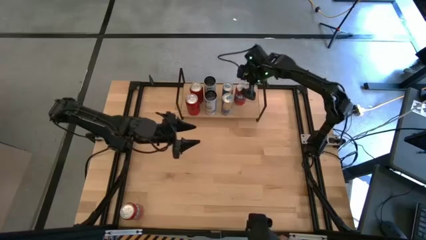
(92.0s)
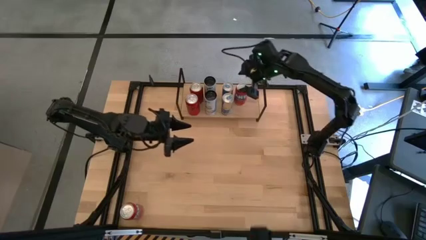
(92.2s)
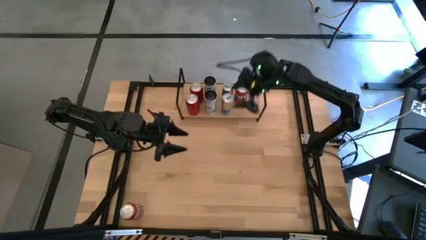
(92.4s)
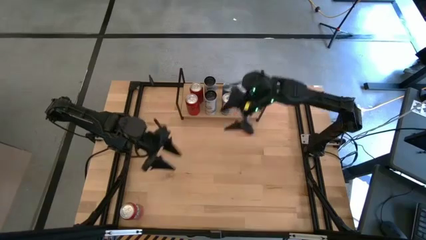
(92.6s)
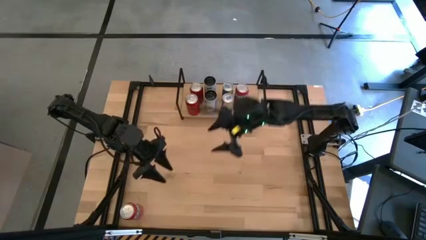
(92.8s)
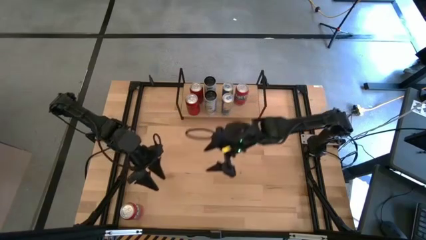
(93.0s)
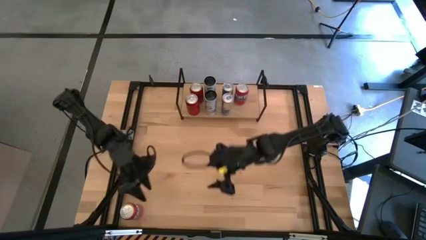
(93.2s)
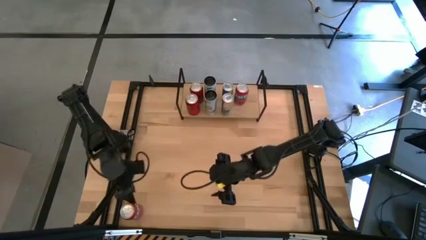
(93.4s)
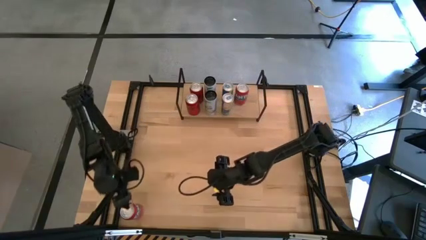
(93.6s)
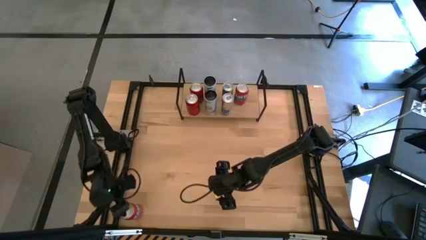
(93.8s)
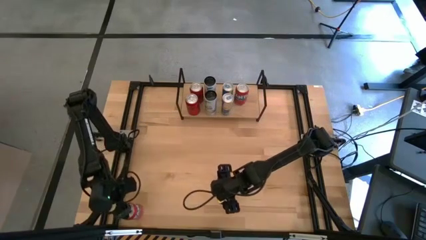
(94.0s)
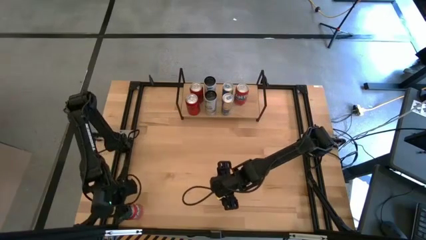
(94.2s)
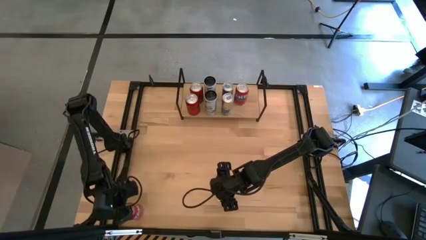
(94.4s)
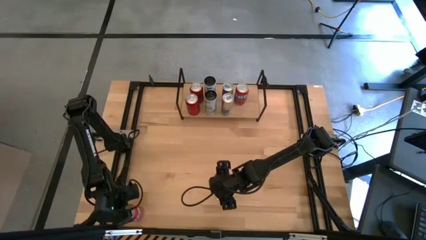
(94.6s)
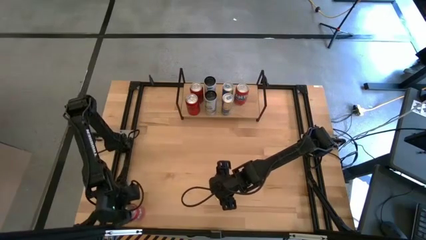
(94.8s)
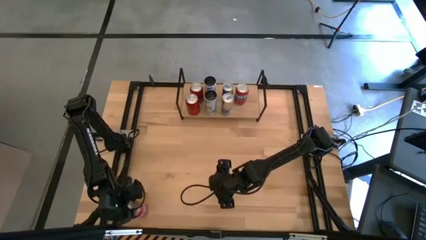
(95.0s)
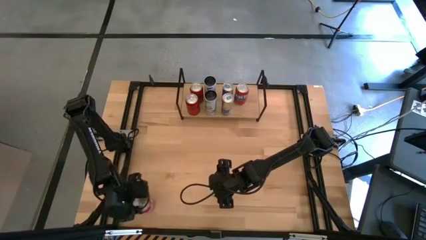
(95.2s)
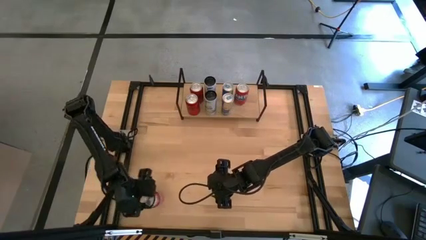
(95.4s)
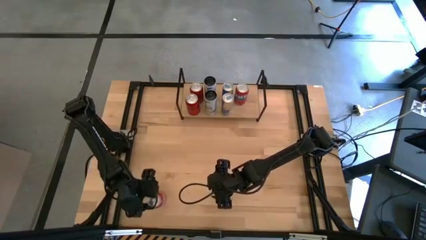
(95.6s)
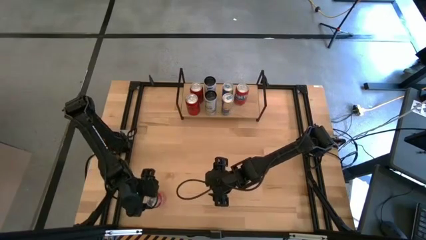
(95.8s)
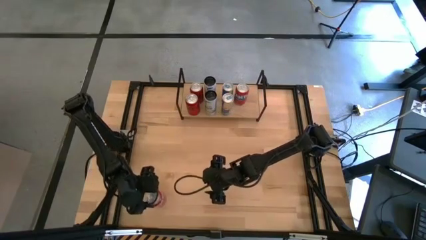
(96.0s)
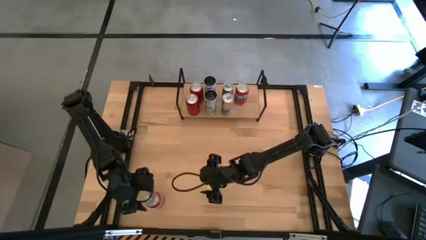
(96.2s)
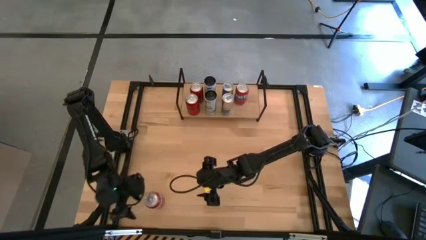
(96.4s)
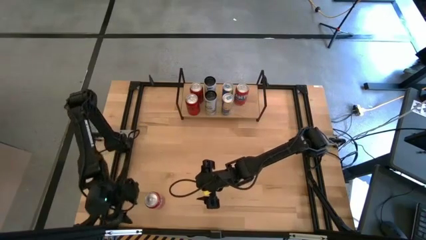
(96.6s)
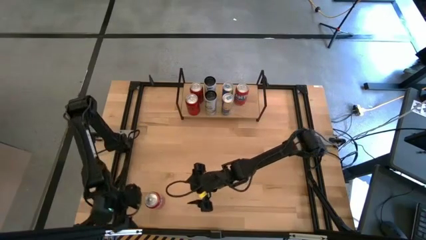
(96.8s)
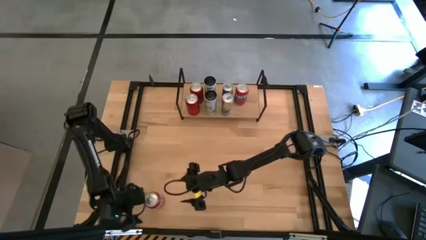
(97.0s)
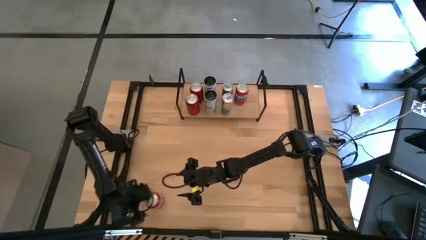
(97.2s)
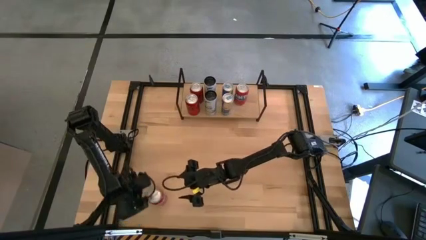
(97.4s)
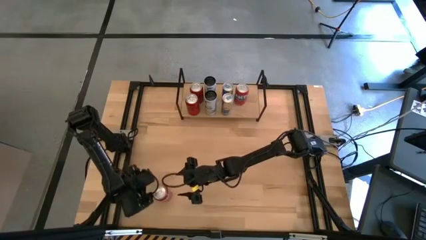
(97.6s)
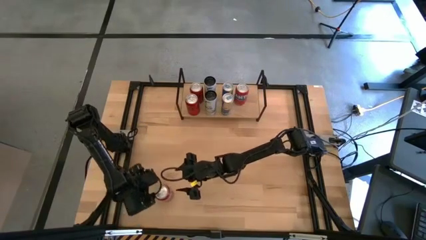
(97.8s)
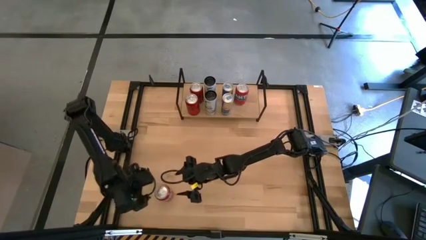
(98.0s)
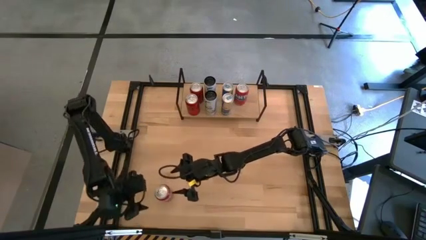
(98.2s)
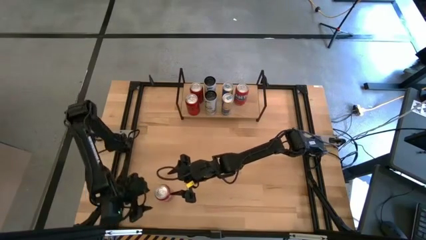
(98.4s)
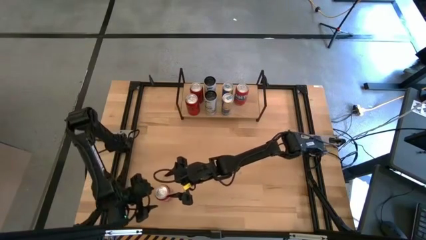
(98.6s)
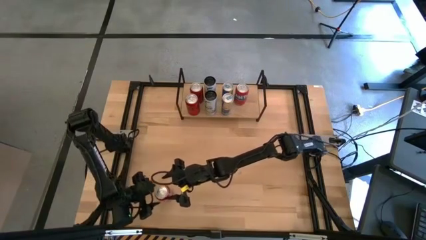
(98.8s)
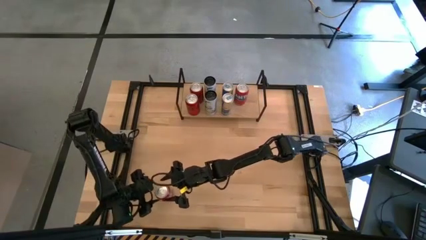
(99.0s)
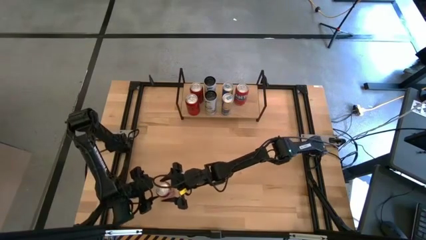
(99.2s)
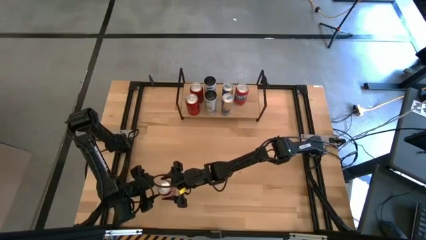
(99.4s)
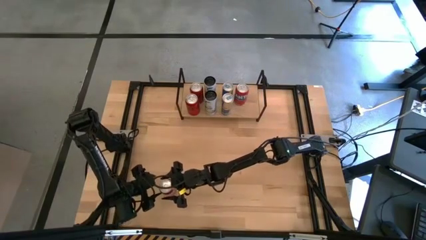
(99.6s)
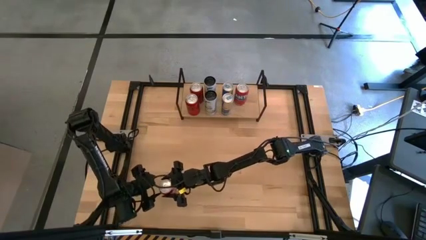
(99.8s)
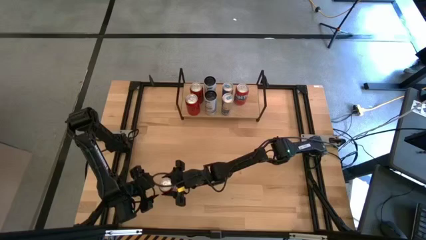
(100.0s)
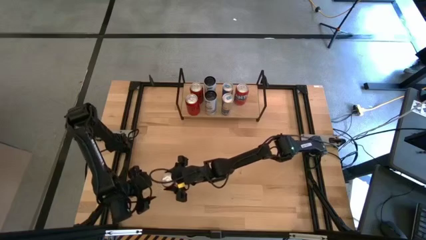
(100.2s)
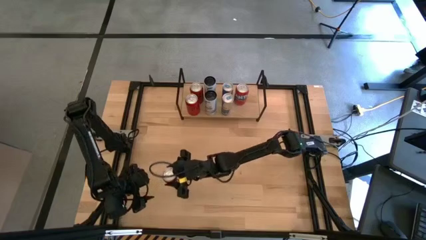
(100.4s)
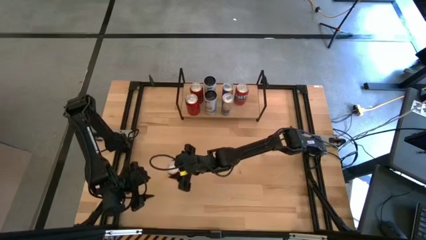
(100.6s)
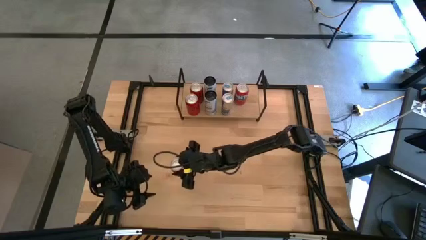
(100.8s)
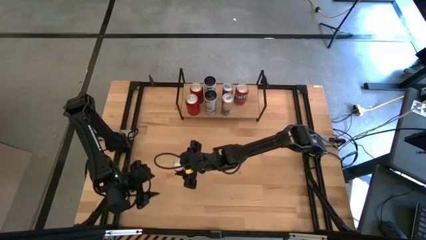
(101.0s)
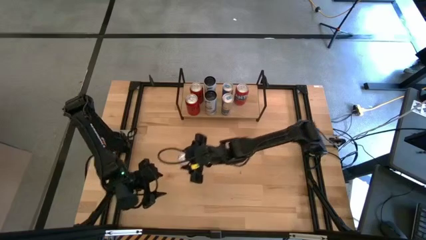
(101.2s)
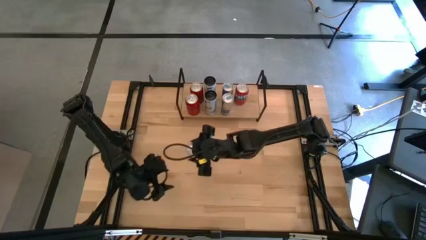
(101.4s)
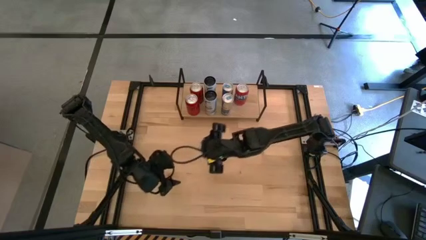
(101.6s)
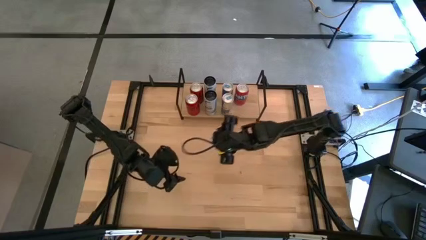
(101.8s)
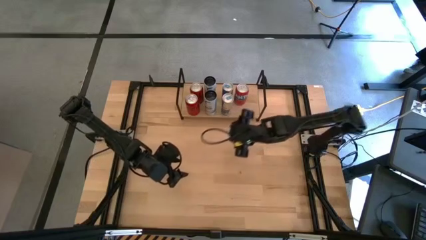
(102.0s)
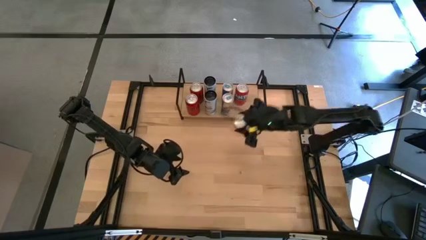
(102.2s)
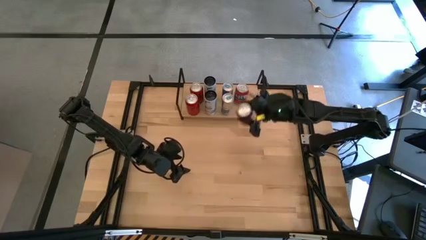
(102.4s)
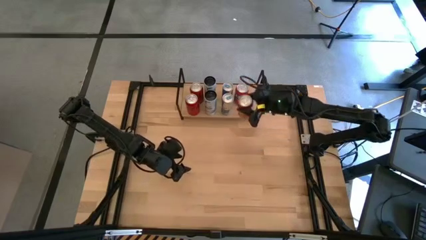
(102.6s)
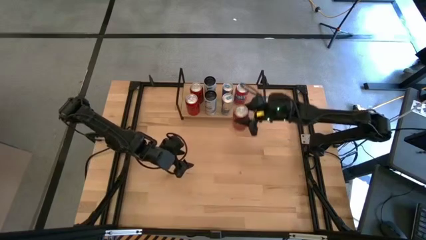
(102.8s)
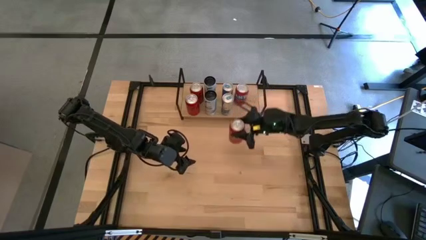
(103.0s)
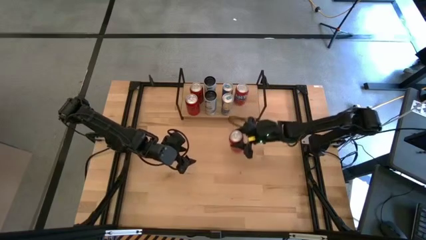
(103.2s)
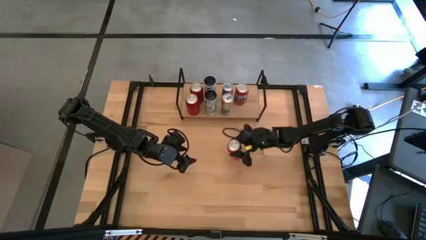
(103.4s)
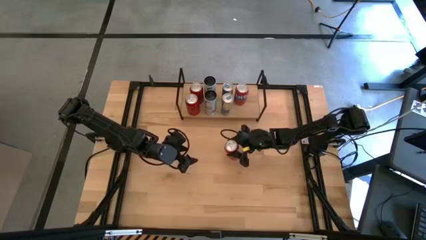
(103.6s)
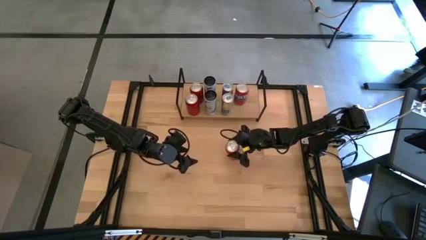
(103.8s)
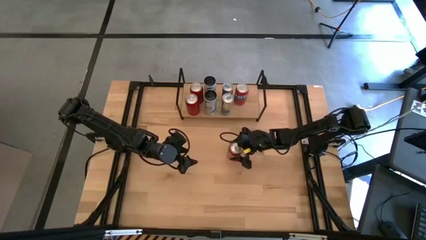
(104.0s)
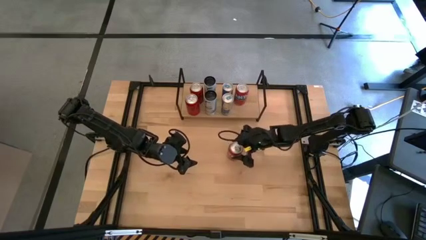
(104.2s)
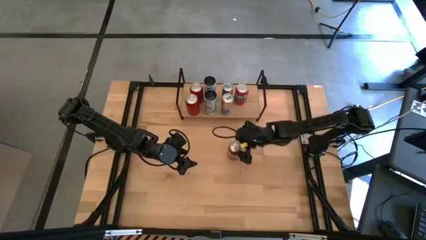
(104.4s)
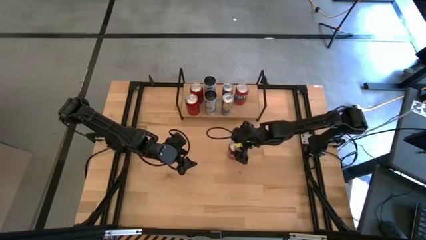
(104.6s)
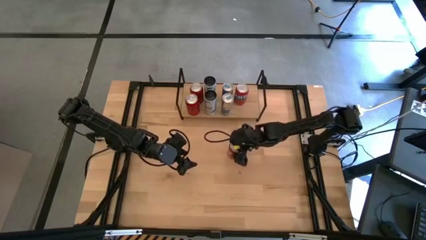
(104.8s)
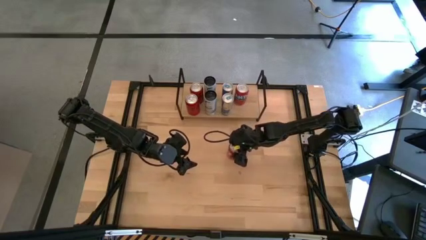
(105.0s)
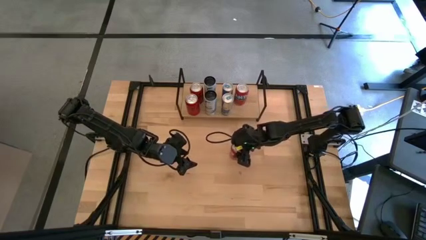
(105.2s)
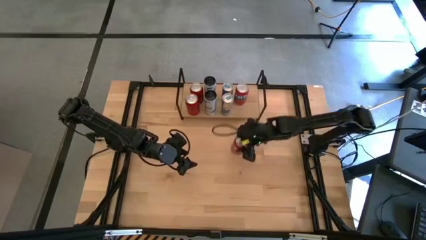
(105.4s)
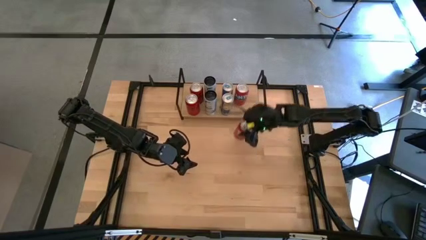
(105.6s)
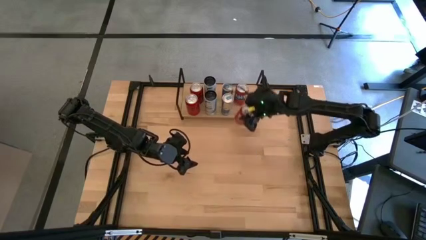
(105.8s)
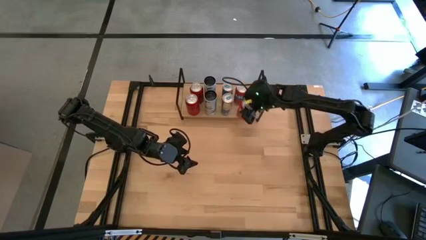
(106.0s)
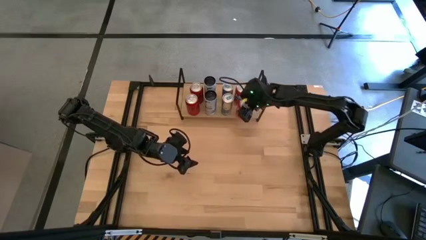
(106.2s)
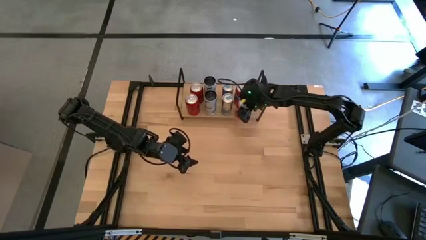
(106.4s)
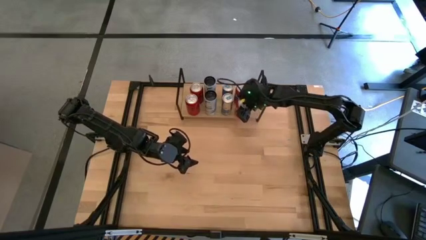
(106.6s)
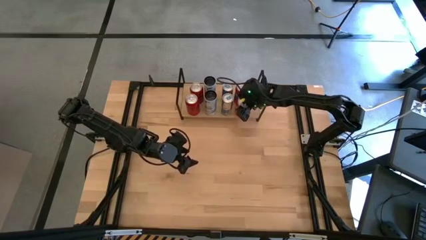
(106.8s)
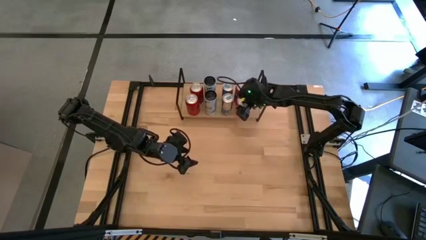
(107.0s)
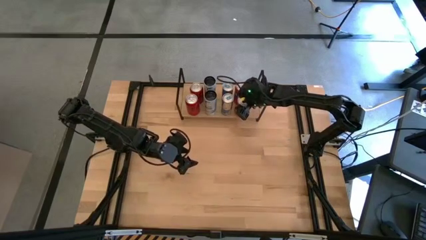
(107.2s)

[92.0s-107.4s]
Task: Place canned beverage on shelf
Put the orange soda can on the shelf and align it with the other orange soda can

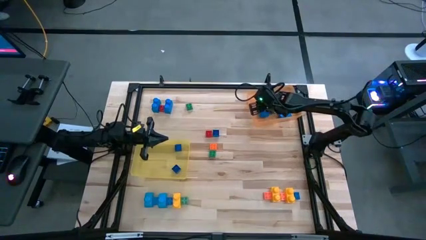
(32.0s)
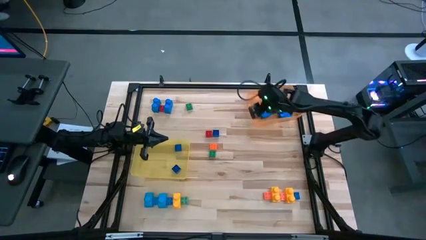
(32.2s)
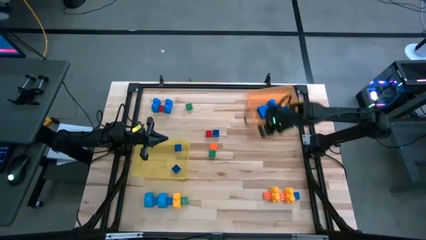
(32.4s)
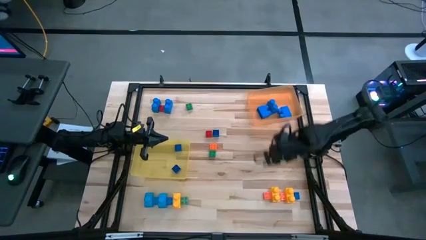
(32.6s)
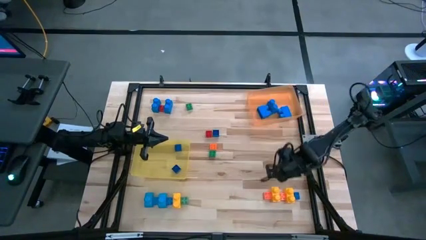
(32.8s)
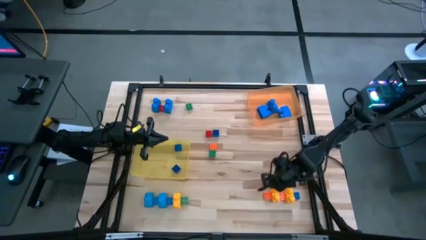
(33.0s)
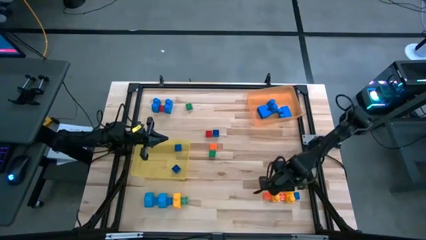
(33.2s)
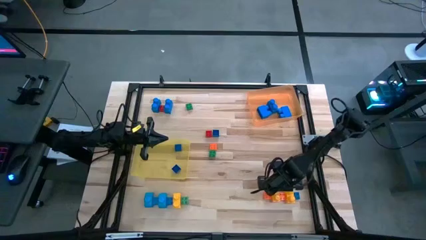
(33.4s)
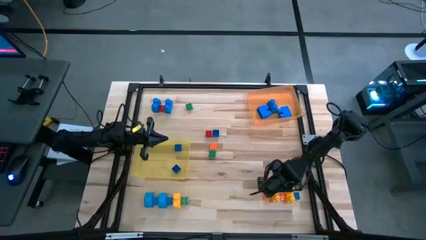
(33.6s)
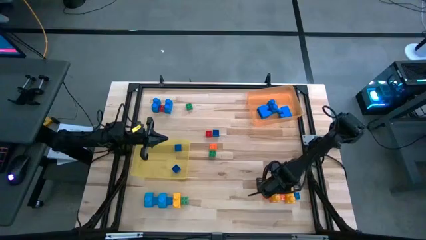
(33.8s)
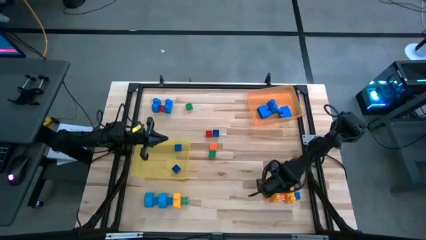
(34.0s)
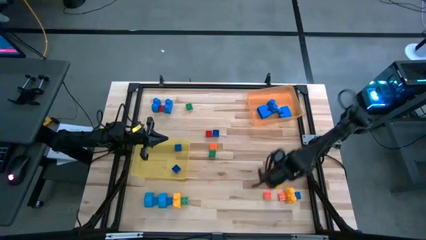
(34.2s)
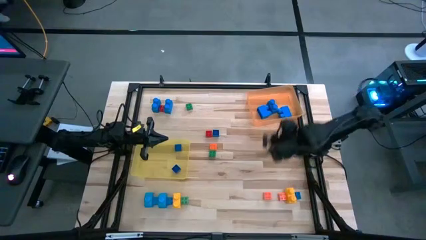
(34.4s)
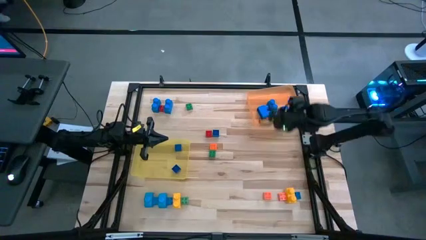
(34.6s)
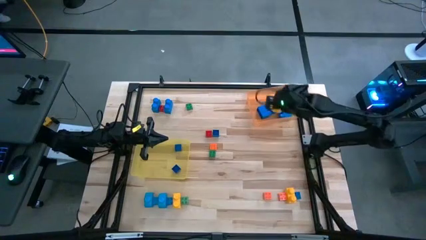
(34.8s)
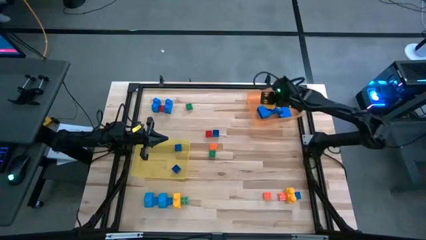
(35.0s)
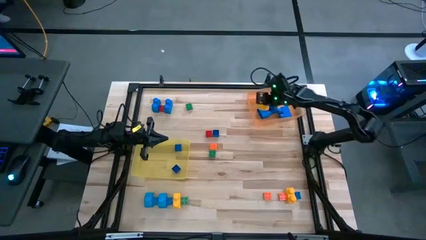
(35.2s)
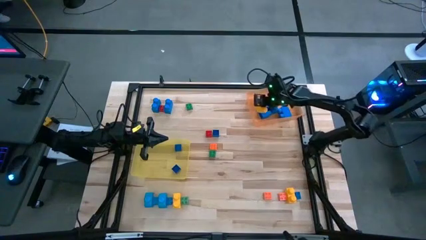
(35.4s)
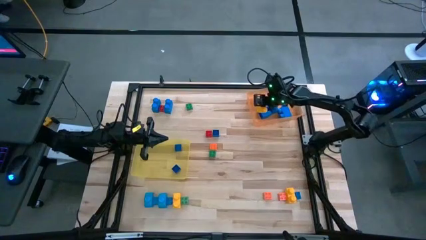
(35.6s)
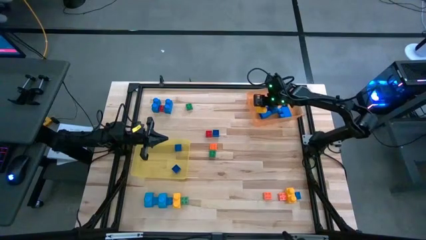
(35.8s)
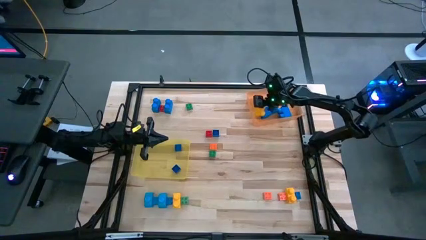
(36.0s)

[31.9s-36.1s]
Task: Sort blocks by size
Put the large yellow 2 stud game piece into the orange bin
